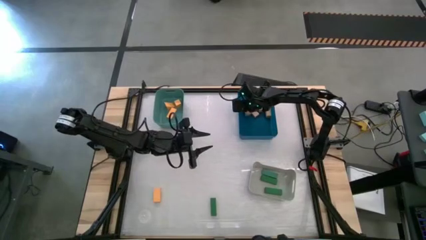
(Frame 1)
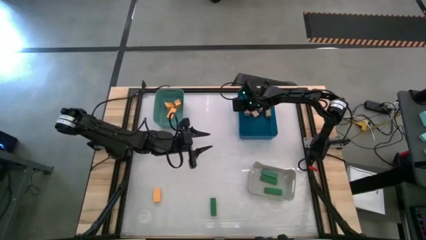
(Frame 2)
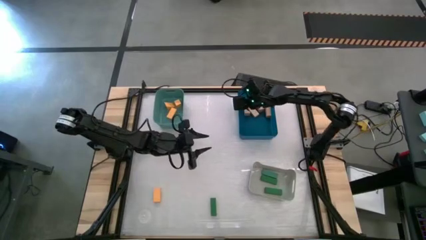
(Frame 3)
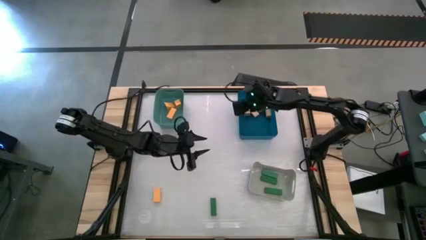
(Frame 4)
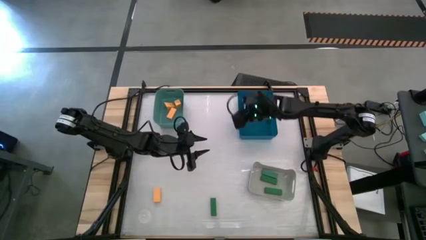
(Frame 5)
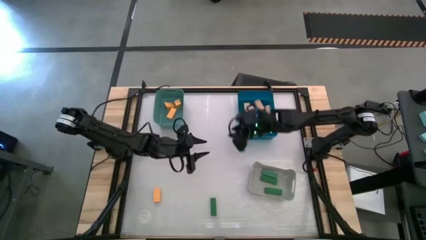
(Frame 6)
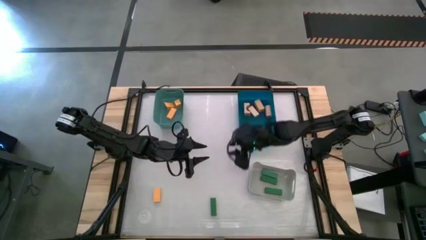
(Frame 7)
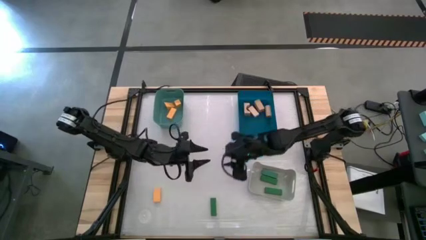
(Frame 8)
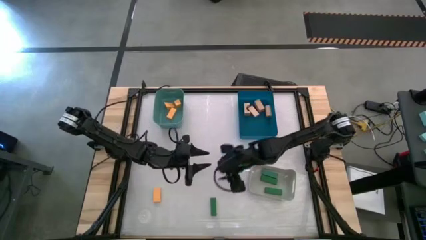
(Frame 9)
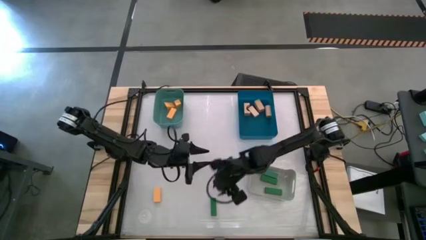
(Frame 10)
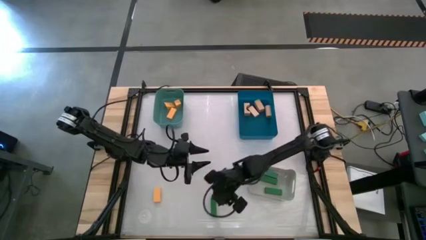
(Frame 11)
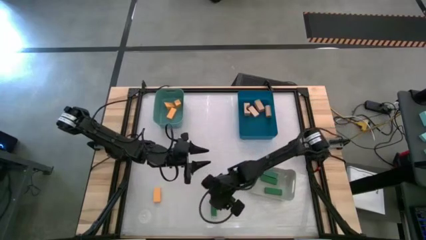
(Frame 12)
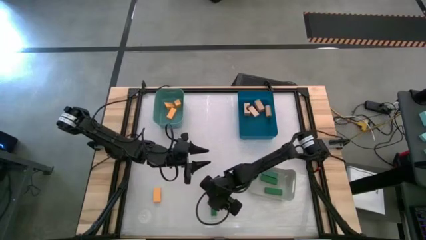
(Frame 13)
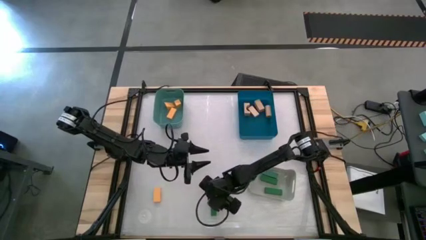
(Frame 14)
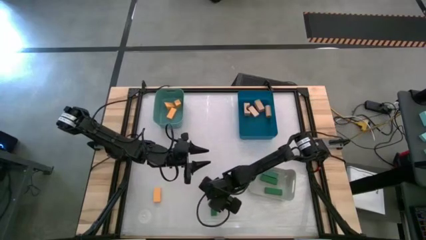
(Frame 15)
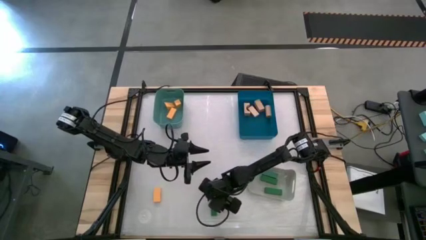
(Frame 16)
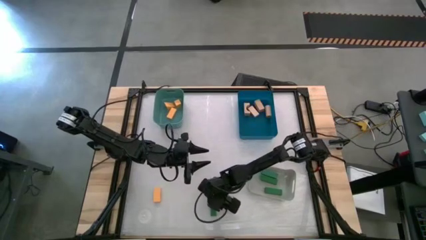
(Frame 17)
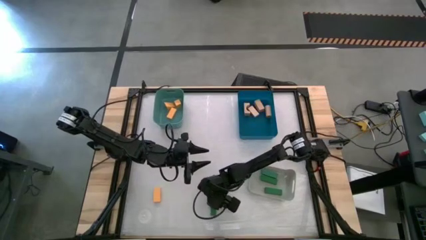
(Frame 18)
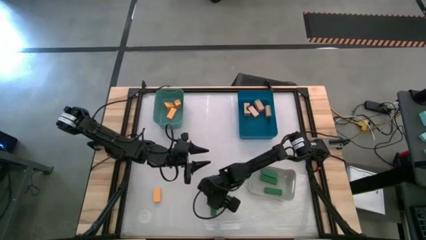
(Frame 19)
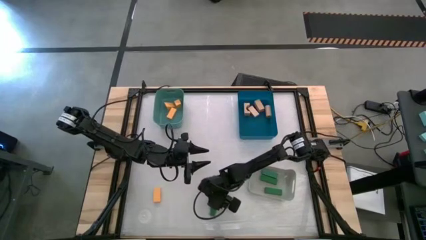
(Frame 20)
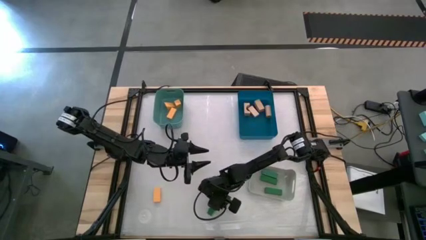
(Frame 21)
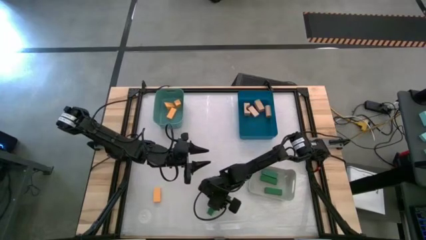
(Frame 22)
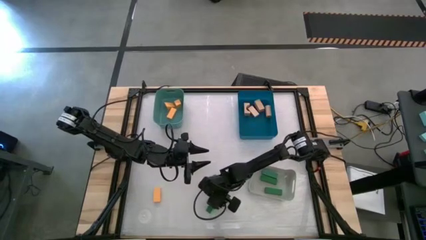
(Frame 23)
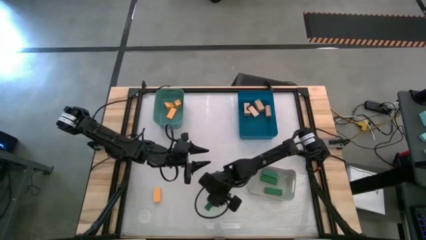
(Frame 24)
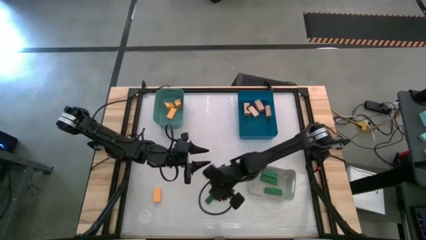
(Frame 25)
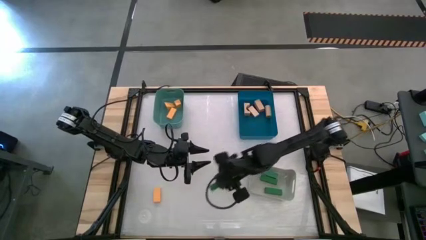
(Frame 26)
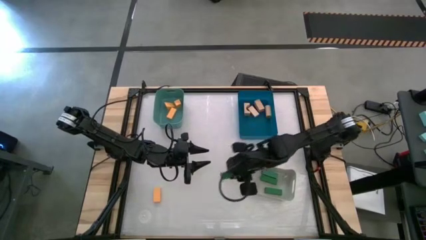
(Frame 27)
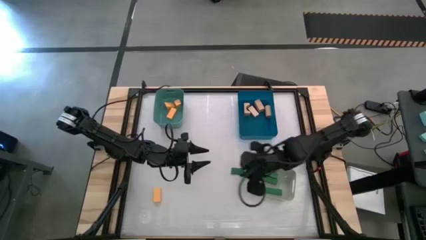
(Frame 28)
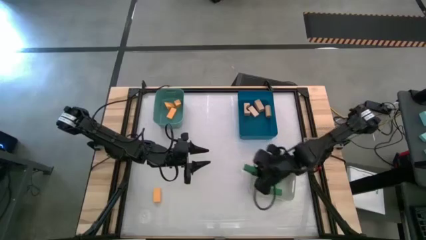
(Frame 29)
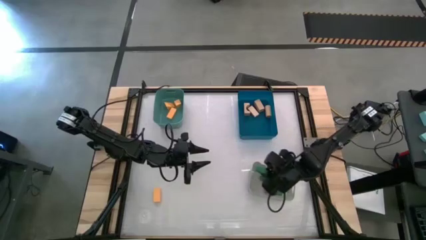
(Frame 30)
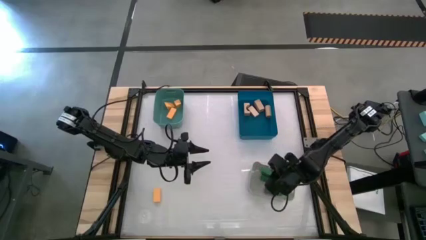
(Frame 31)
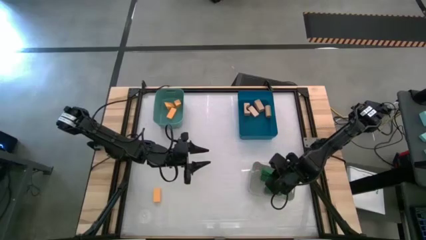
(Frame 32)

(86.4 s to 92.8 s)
Task: Sort & place blocks by color
Put the green wooden block into the gray bin

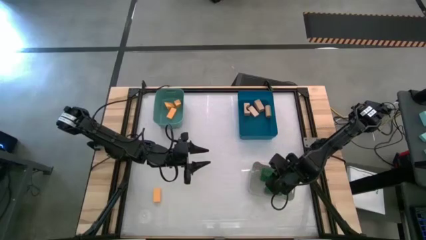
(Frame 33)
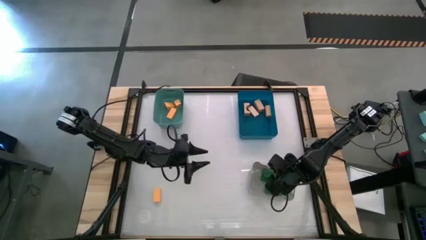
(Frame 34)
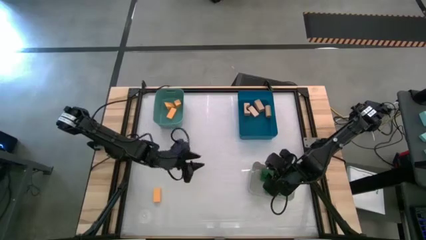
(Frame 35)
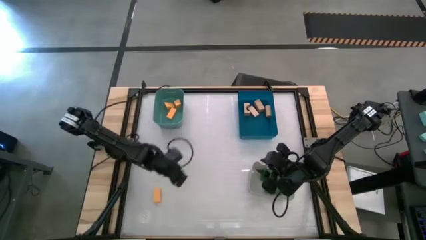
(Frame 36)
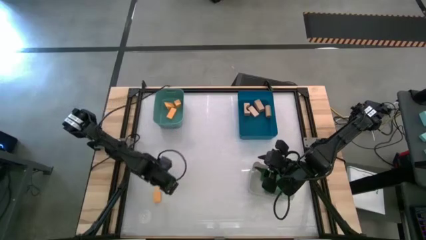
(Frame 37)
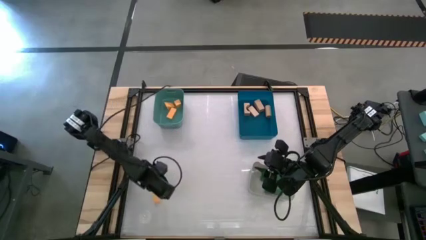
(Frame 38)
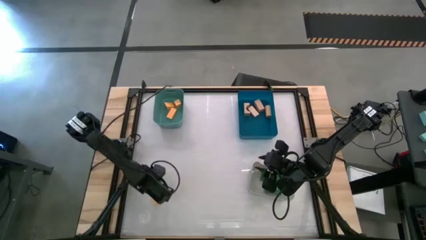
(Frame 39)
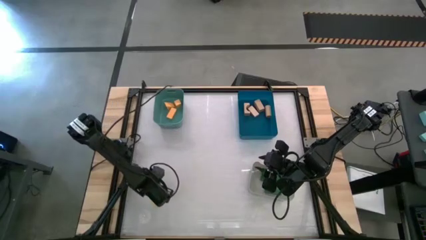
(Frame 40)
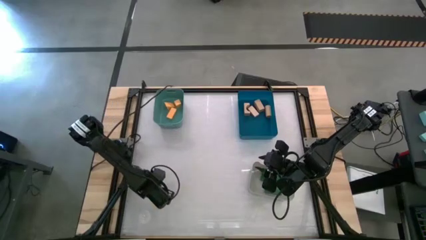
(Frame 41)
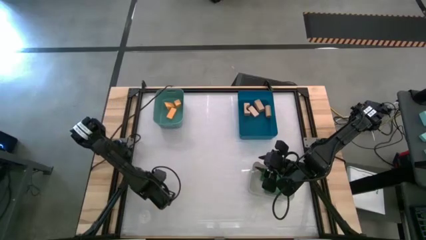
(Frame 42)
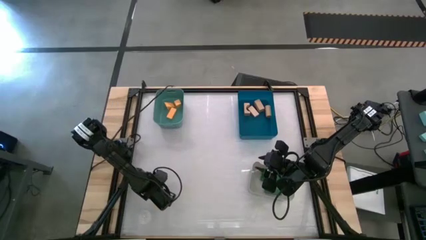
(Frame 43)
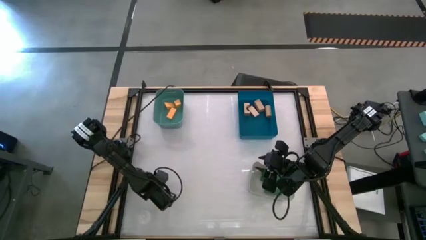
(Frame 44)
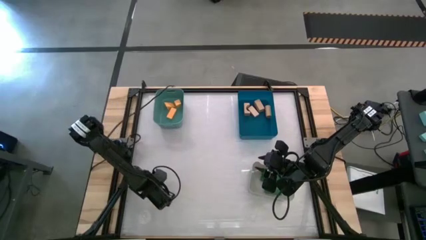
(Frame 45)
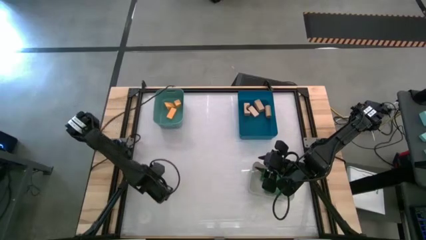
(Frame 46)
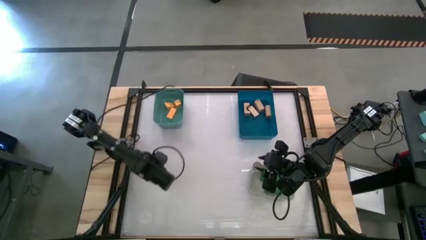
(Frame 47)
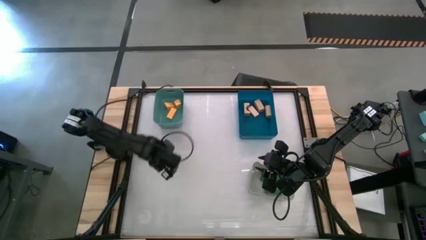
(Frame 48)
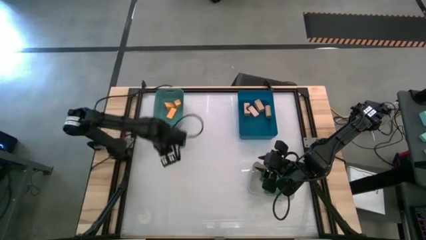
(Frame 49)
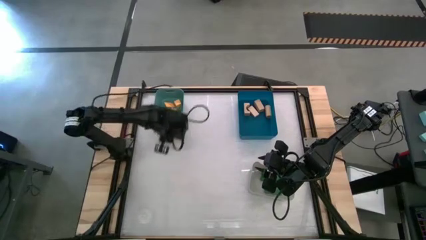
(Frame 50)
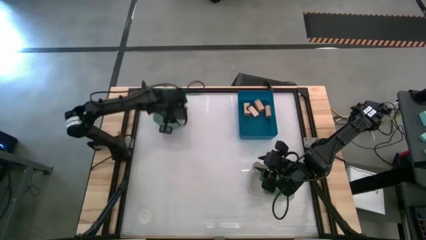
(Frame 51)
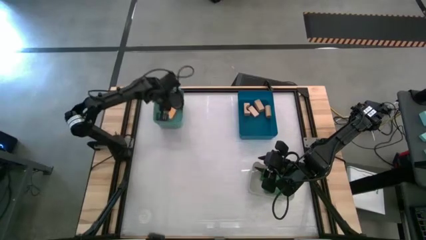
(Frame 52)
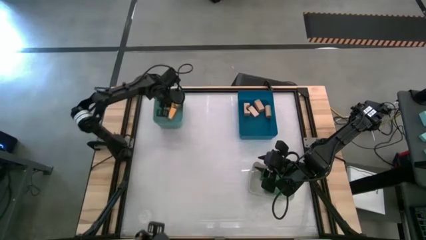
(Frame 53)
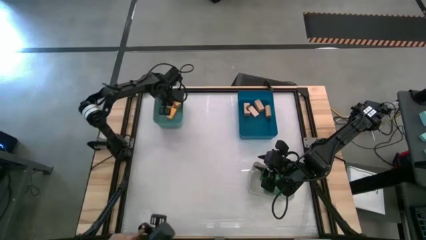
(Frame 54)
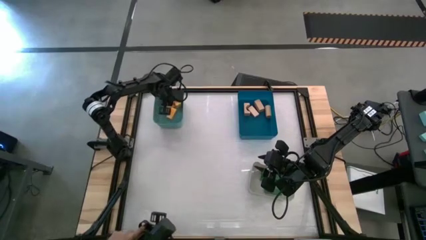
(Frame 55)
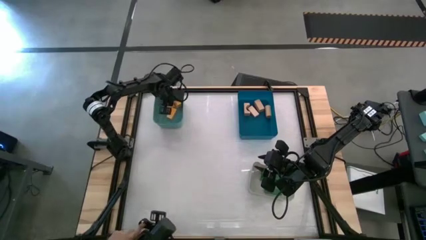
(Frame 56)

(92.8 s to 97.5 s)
Put the yellow wooden block into the light blue bin

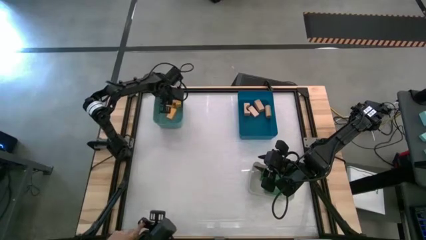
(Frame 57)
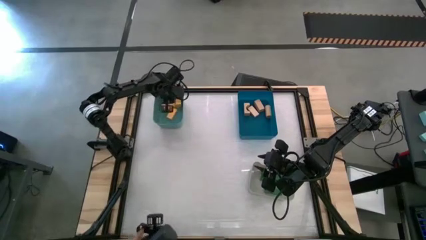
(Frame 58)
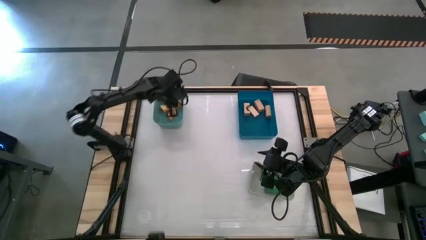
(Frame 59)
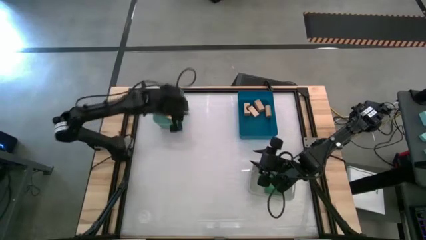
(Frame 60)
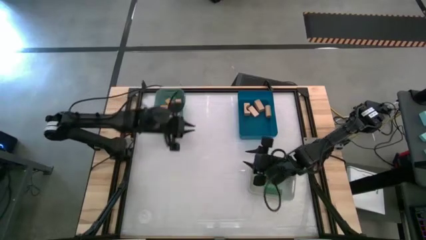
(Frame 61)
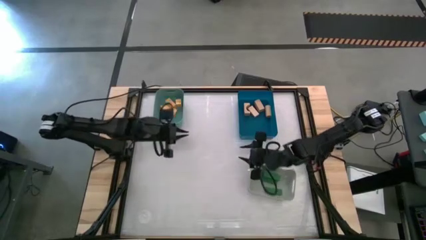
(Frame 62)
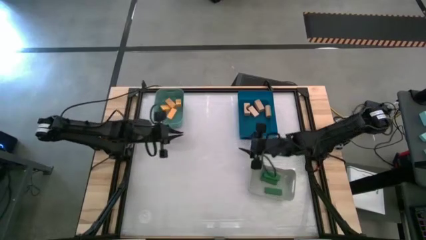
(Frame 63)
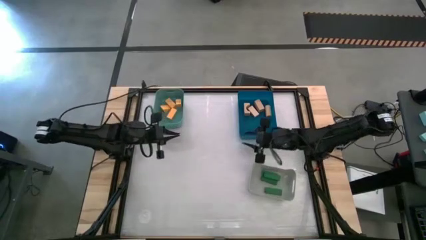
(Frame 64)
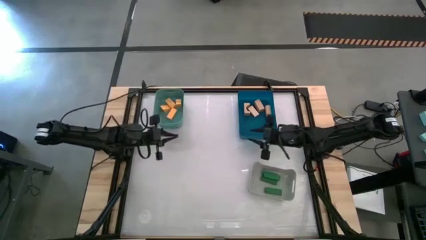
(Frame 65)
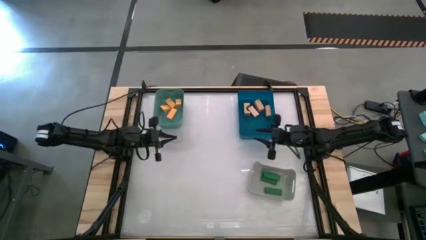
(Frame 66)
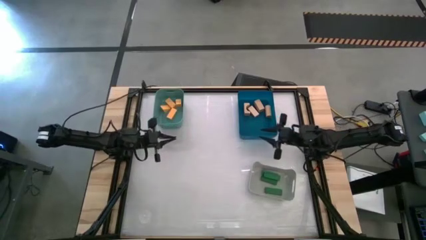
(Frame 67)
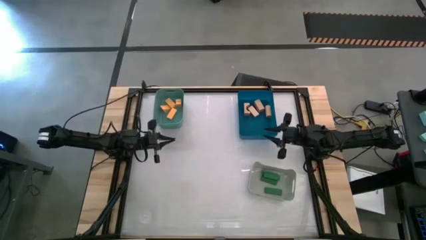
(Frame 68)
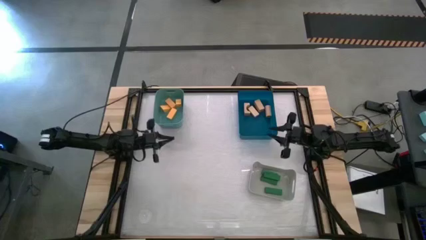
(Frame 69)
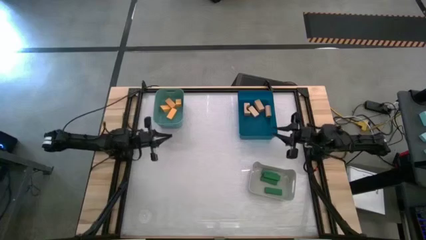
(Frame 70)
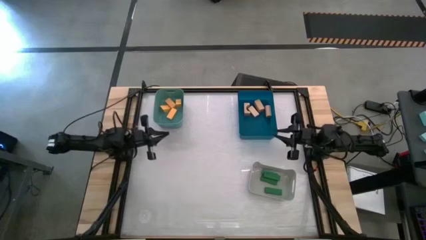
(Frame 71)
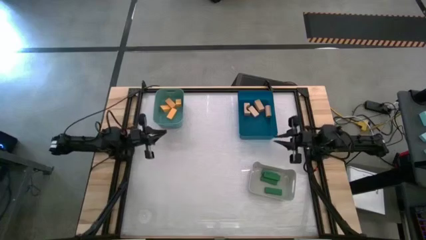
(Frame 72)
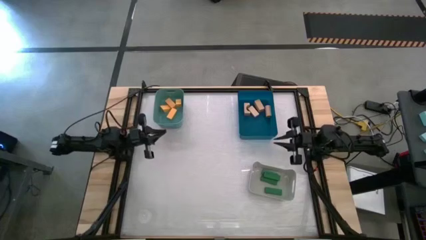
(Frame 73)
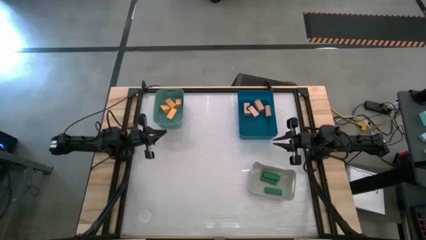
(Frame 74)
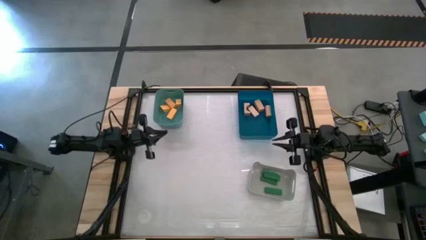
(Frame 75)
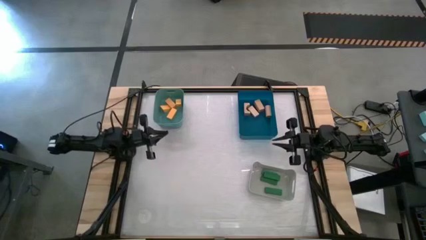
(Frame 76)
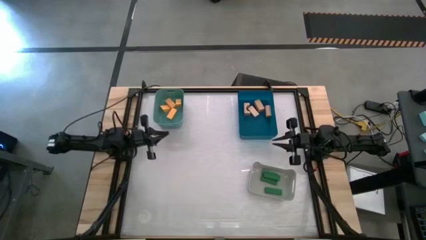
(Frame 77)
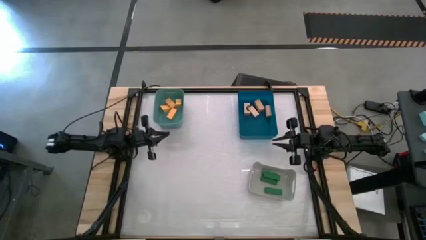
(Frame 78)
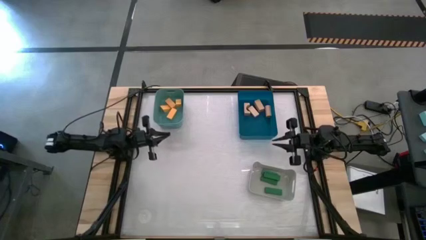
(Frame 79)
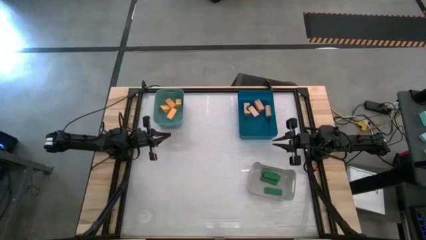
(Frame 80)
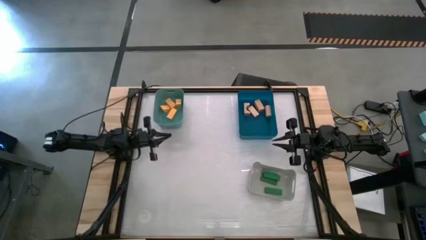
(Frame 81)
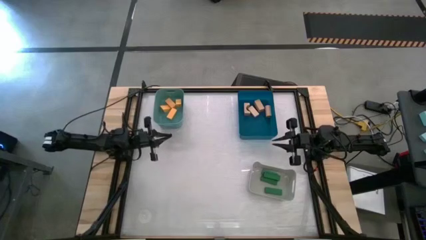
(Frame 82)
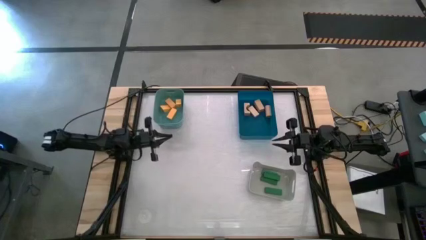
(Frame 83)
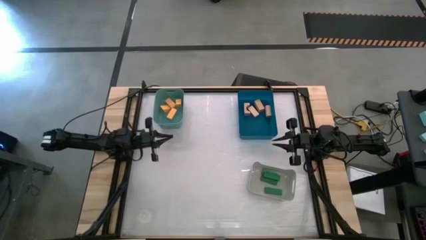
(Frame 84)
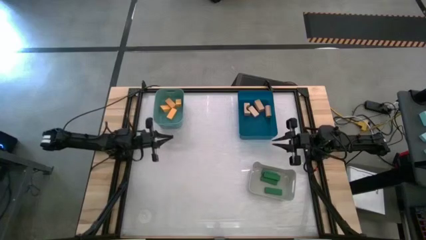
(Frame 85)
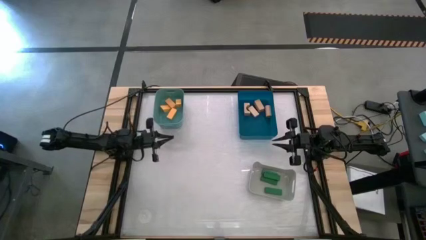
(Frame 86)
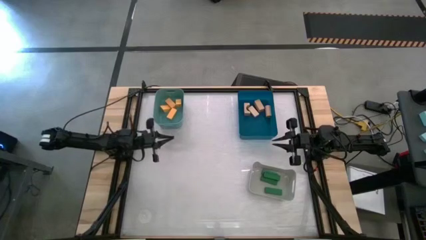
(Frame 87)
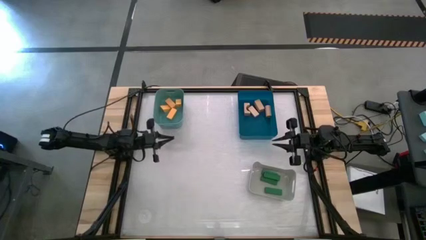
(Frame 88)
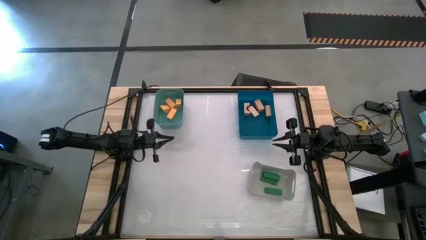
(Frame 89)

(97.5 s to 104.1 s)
Return to Home Position
